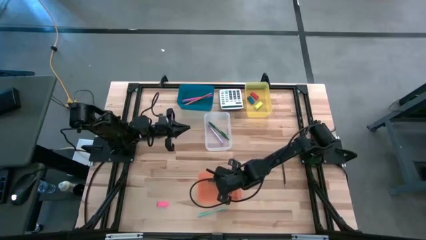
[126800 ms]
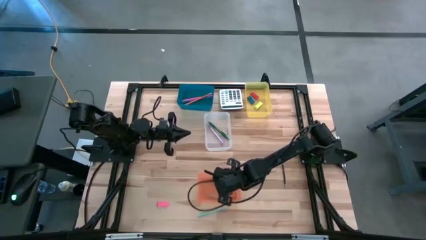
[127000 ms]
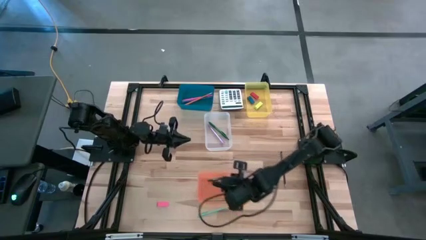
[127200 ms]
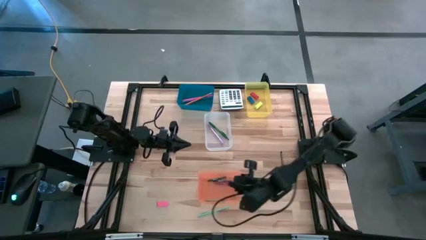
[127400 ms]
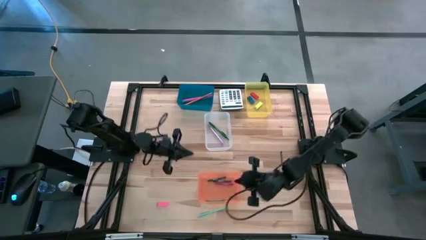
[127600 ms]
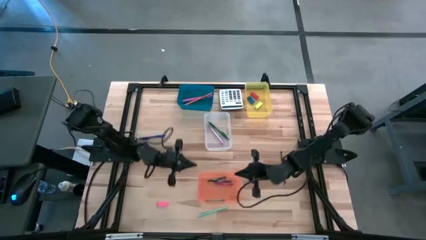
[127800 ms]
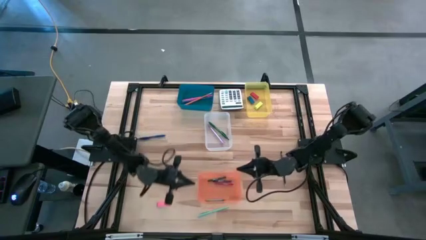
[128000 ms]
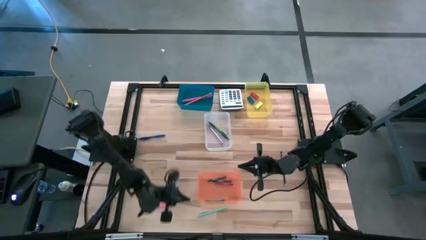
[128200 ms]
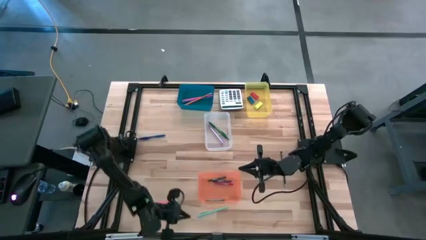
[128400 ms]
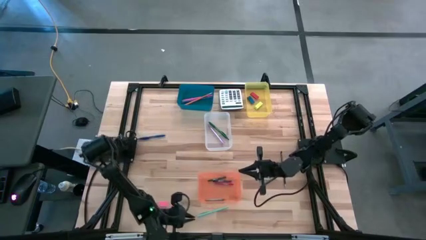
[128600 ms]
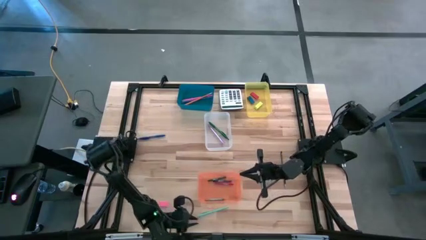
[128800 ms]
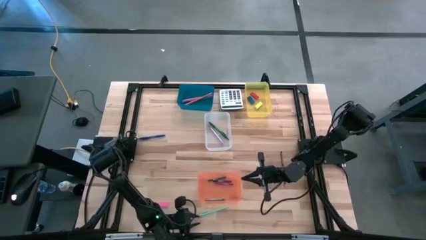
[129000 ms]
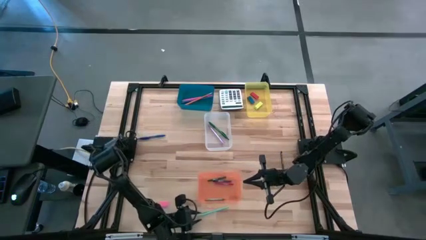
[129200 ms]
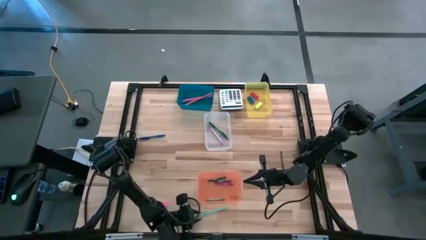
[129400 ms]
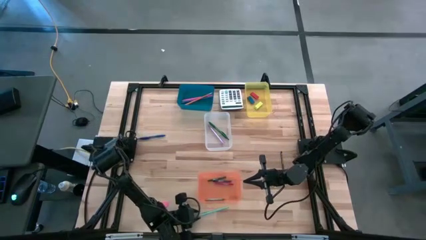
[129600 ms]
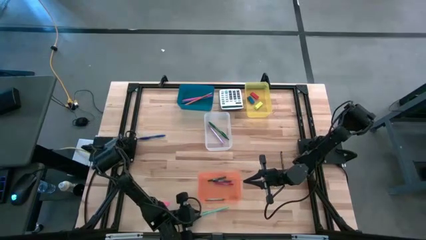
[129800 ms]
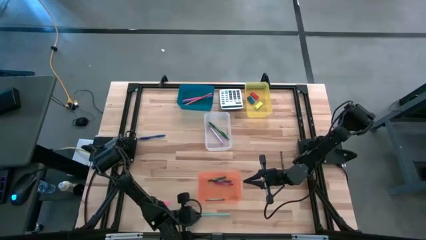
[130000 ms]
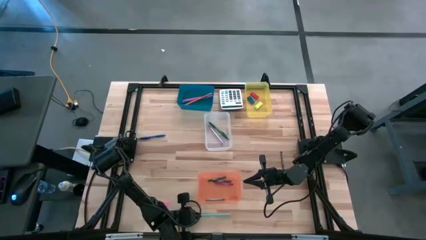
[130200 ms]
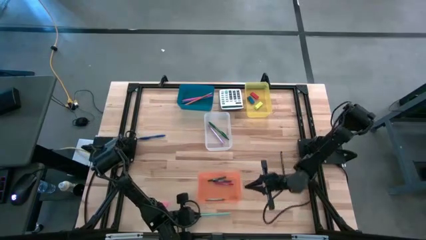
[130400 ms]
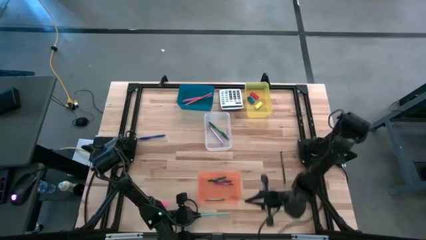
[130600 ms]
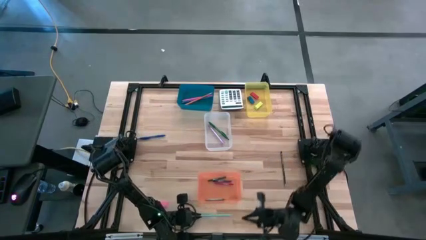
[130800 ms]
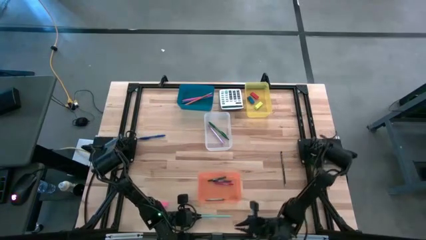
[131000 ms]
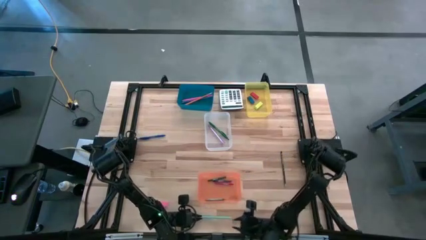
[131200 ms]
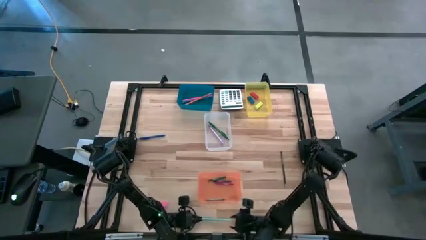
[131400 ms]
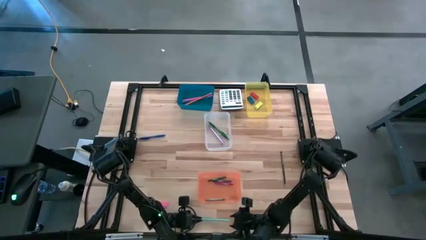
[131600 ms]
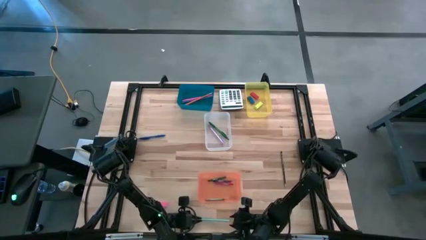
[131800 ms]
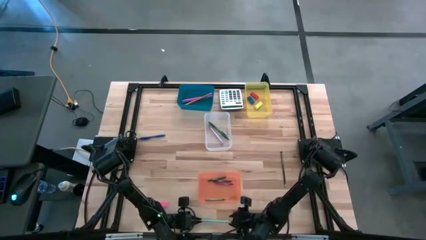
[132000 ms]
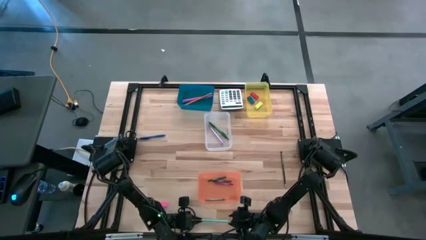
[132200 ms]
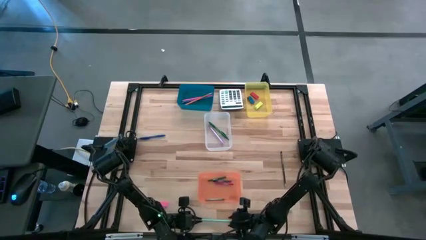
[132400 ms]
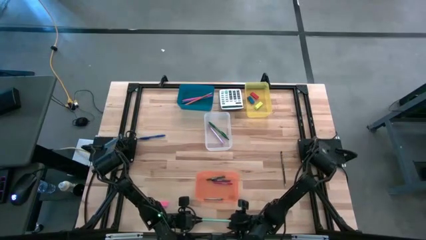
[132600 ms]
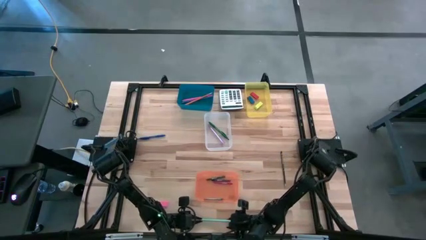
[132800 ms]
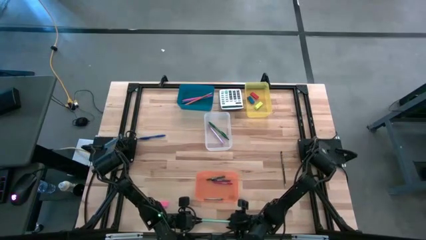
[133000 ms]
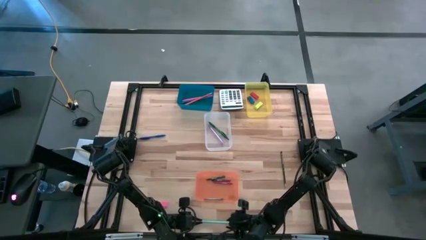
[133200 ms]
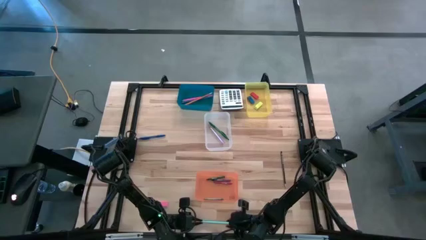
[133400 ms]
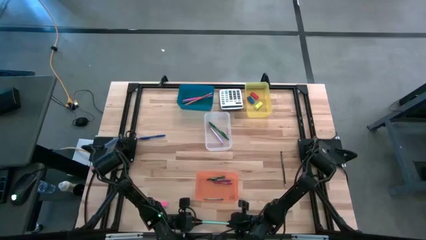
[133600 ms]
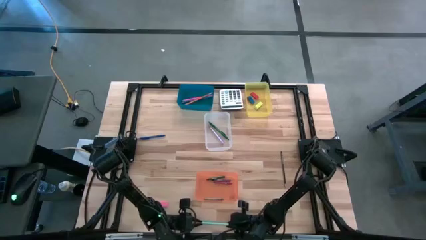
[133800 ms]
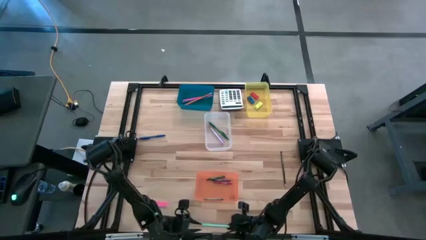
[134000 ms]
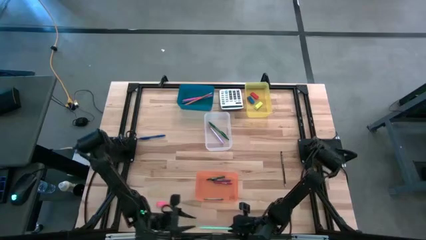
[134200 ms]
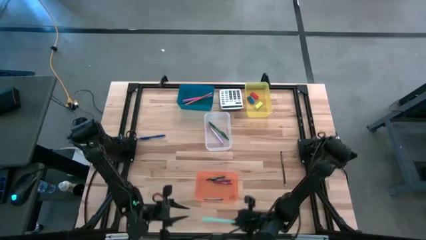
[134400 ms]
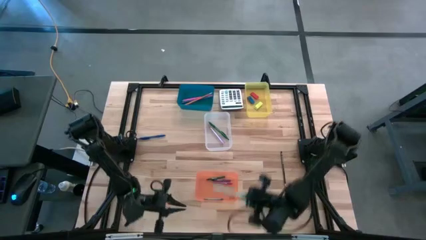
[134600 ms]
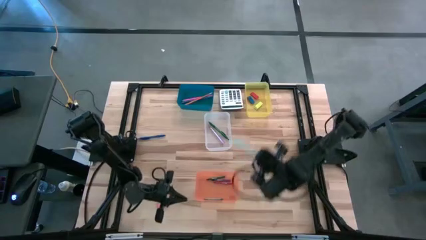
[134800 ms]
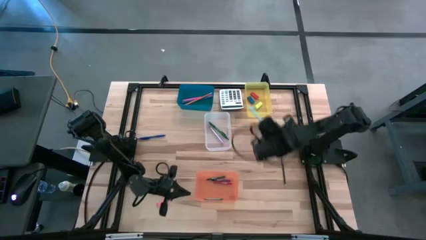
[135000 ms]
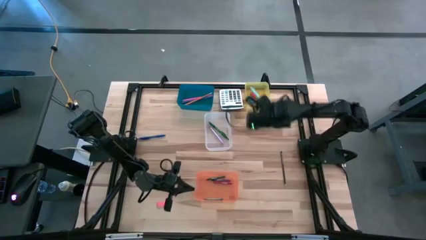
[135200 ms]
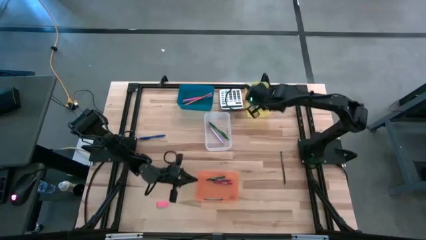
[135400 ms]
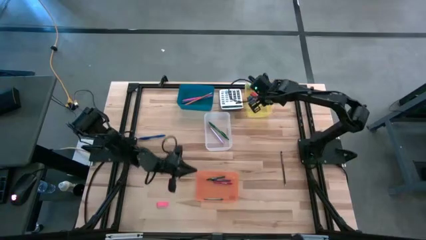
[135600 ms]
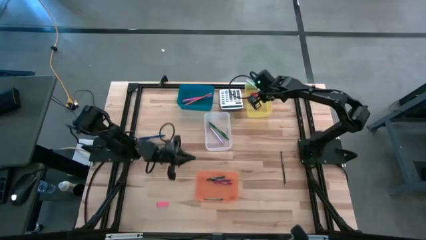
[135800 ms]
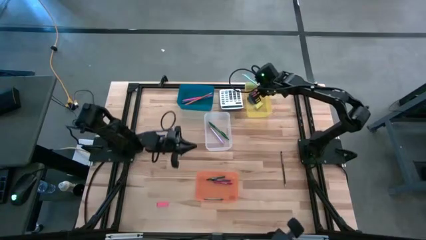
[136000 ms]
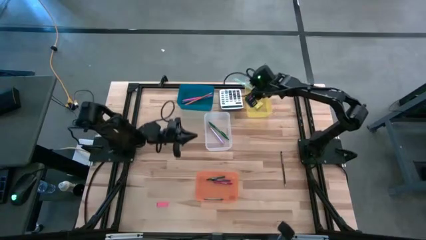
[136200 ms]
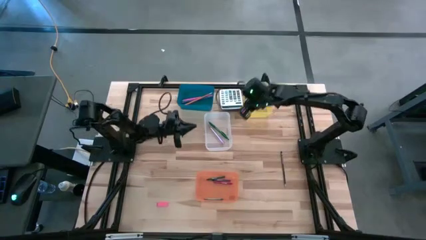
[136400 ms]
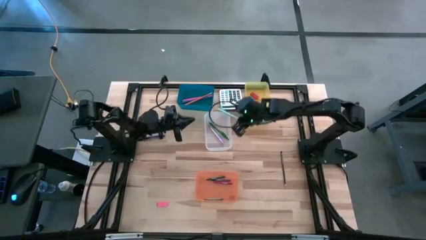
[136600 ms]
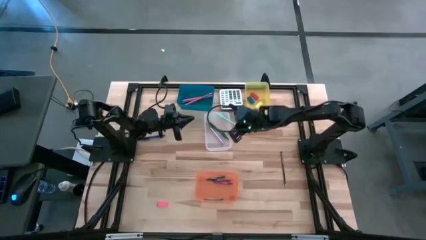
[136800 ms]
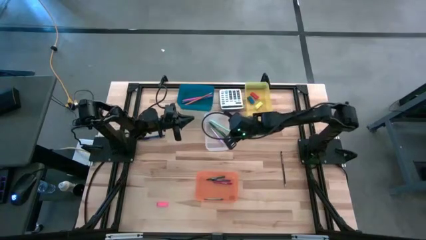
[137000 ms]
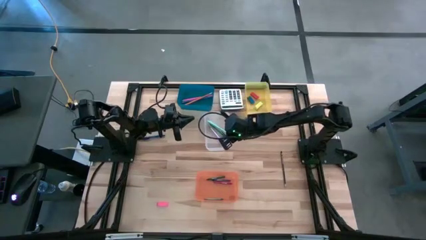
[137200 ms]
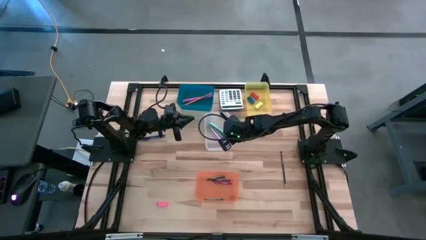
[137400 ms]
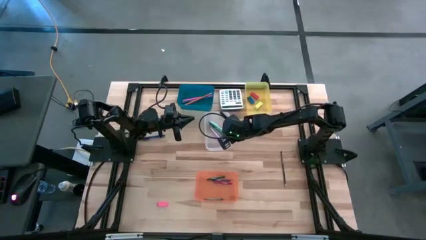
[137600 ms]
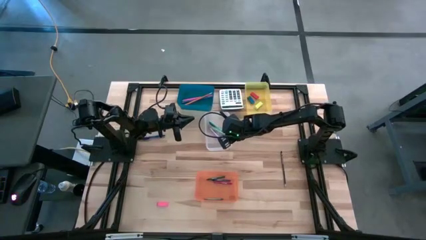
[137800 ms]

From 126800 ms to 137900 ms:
Task: Sort crayons/erasers/pens/pencils in bins
Put the light blue pen into the transparent bin

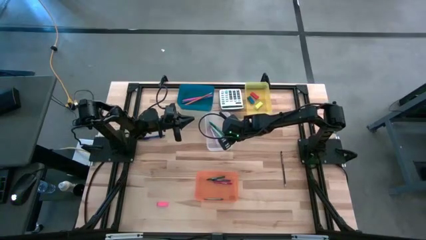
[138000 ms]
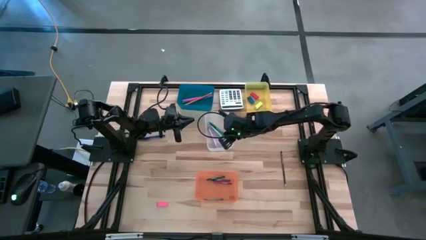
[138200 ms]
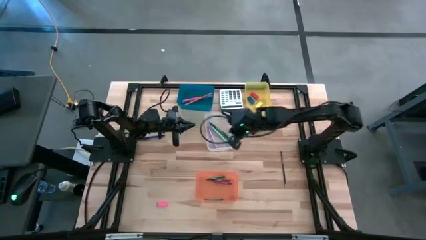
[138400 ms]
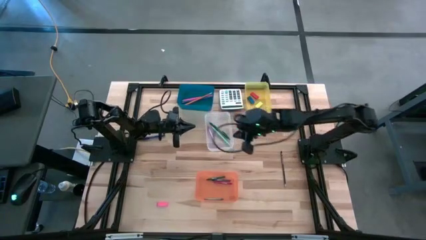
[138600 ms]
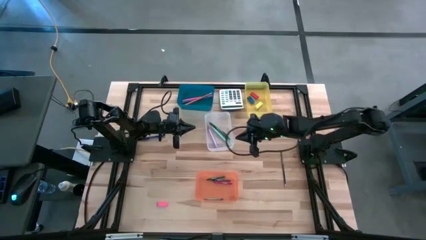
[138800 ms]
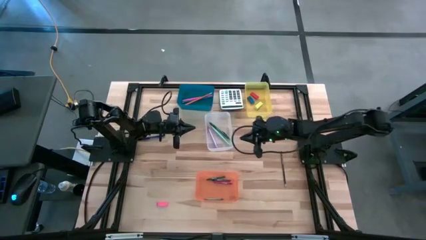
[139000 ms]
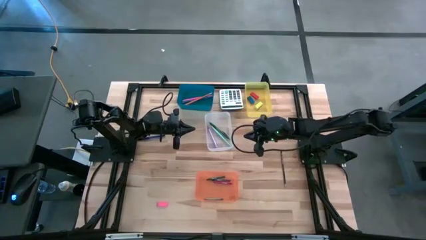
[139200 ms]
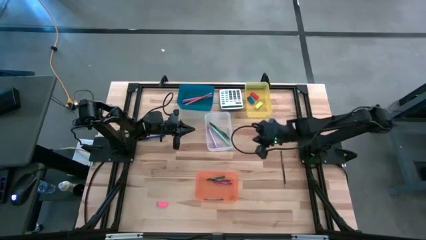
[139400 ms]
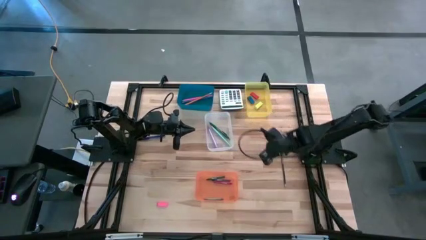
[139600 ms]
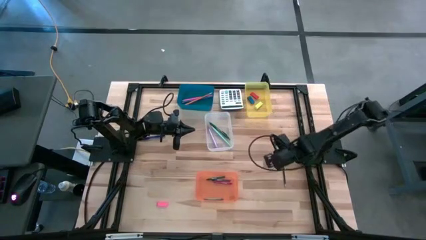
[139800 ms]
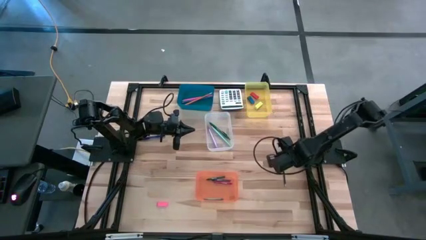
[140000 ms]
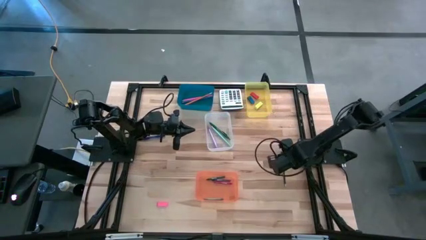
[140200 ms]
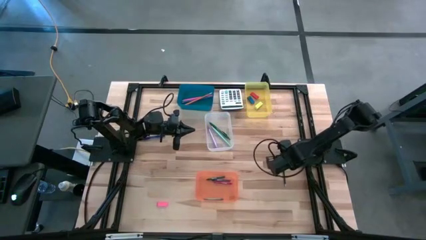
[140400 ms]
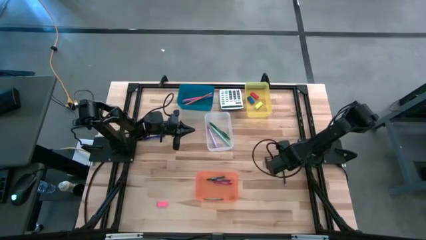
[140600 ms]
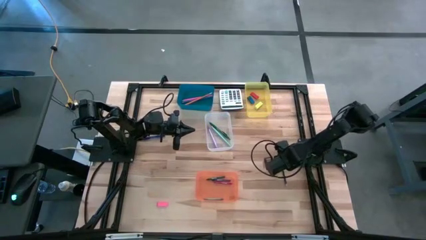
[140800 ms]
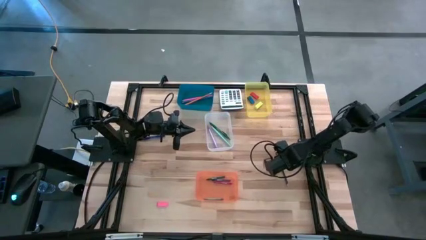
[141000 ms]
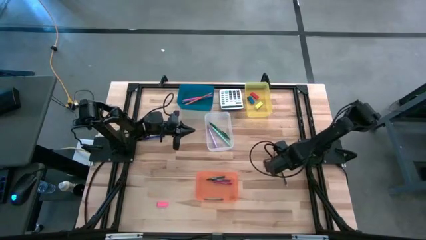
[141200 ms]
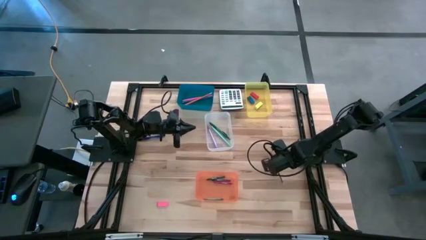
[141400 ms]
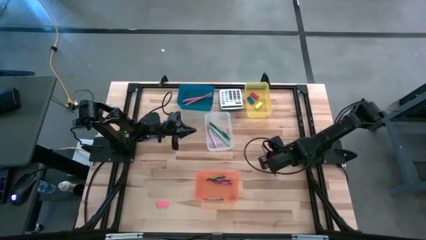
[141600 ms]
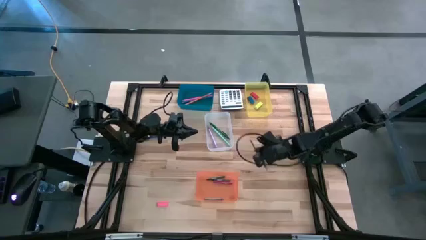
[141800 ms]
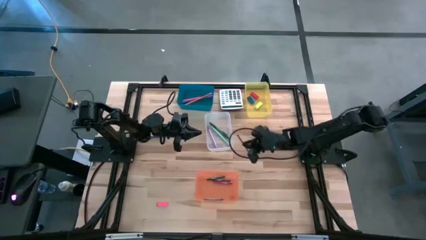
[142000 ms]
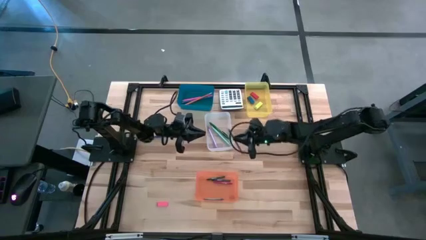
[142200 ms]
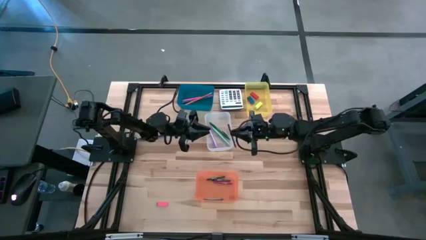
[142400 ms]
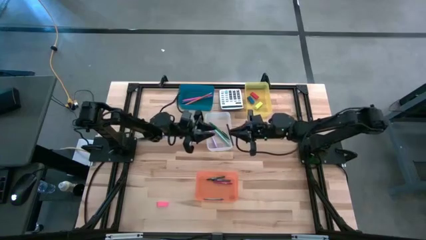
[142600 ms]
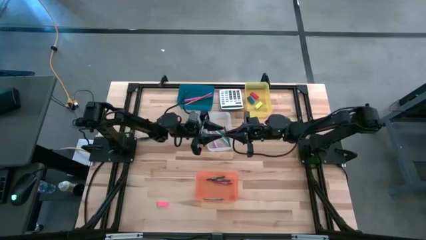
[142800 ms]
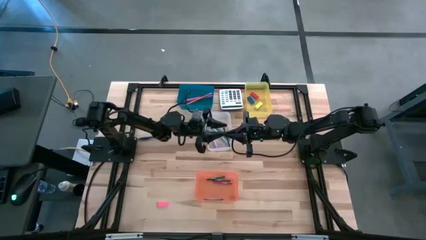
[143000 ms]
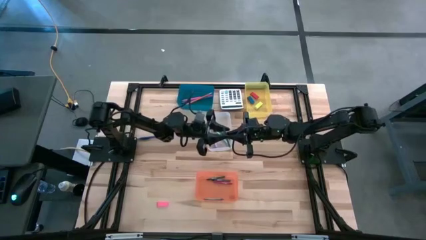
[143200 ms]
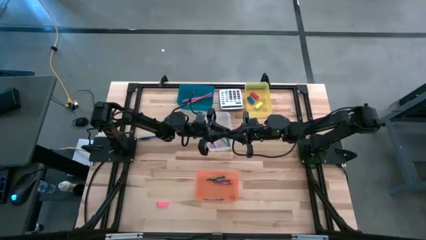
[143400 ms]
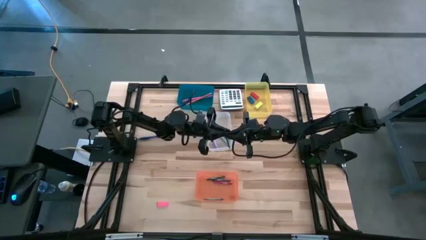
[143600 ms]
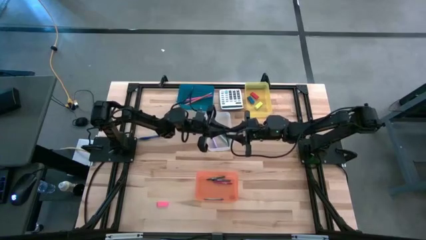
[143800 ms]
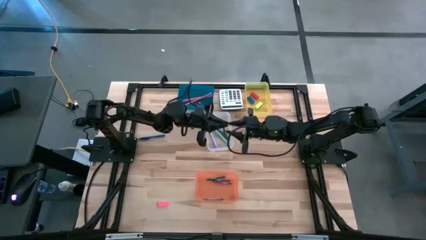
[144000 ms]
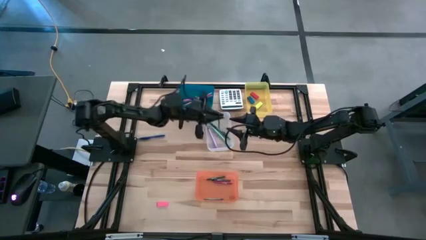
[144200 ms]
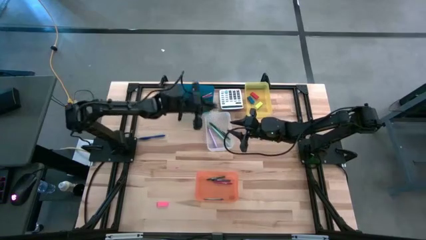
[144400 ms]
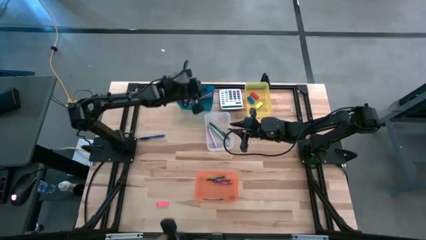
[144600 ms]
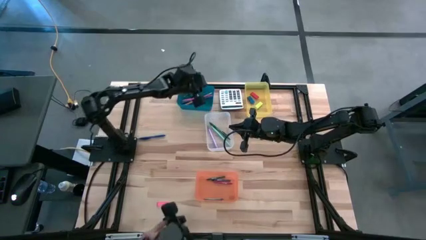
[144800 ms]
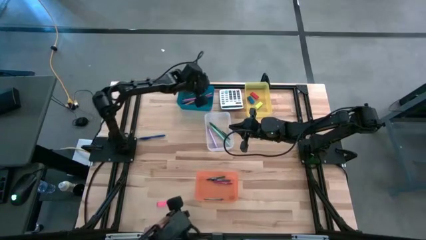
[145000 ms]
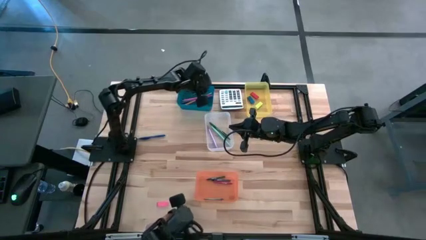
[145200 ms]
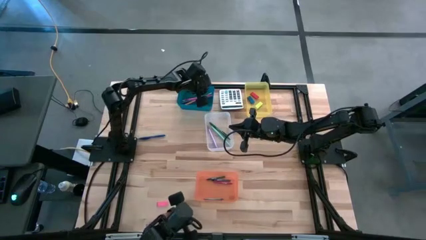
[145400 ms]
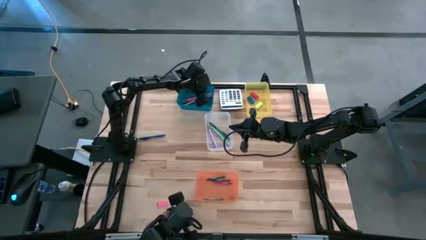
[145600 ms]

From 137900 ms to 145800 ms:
Put the dark blue pencil into the blue bin
